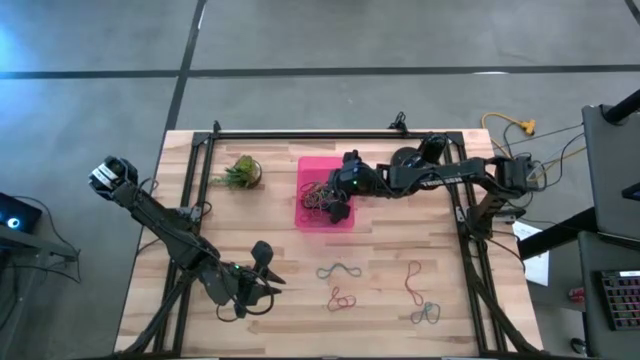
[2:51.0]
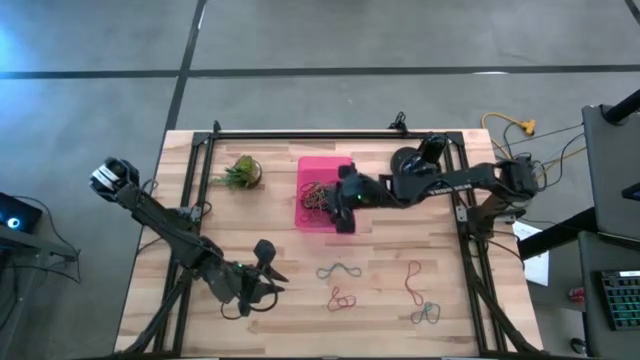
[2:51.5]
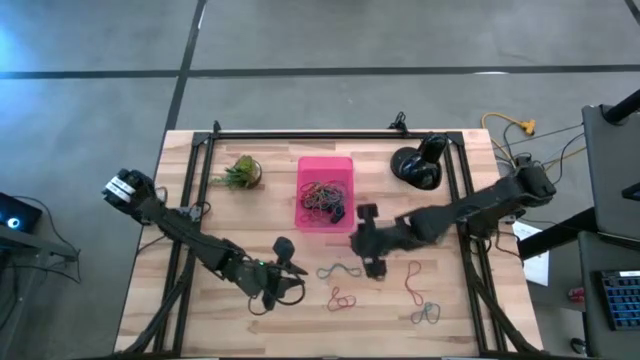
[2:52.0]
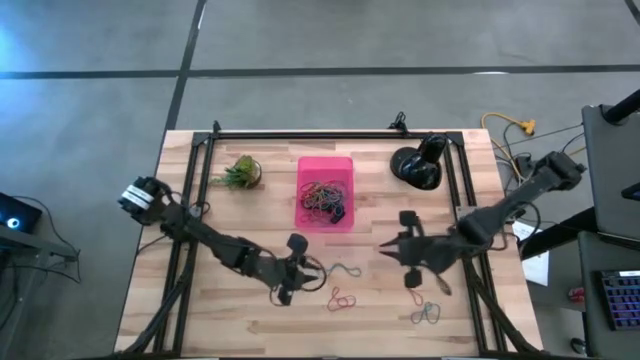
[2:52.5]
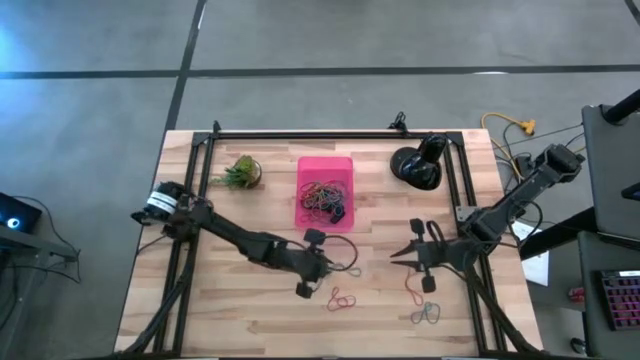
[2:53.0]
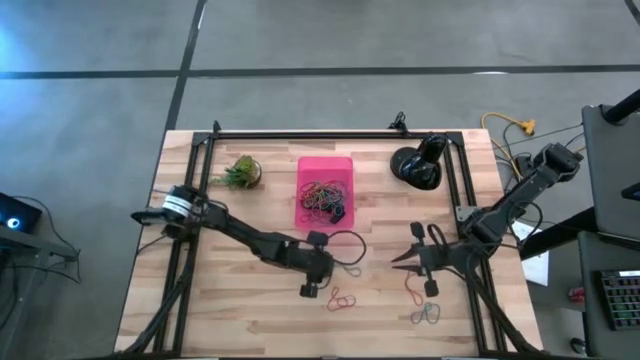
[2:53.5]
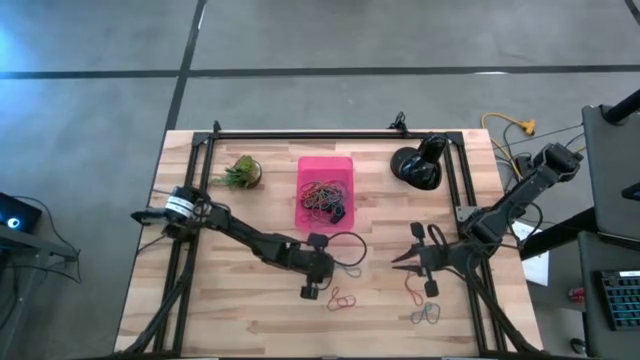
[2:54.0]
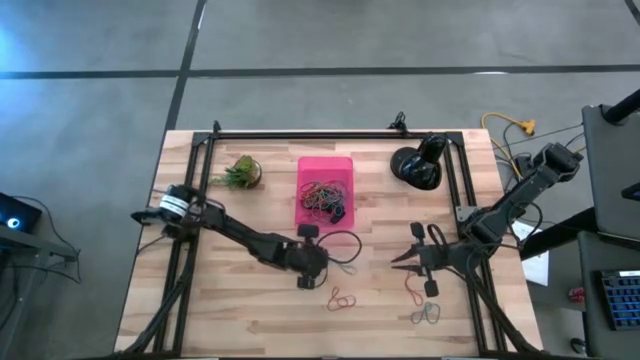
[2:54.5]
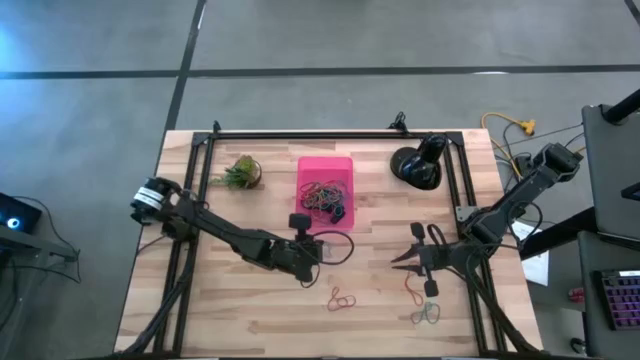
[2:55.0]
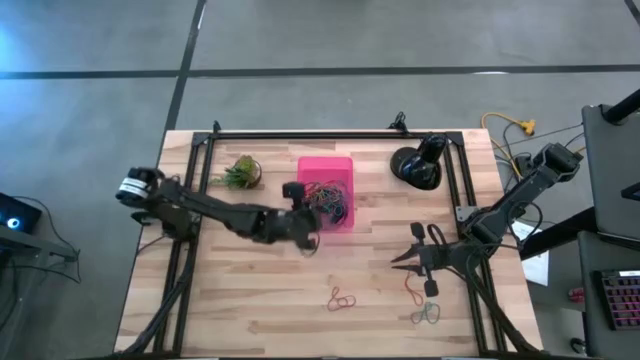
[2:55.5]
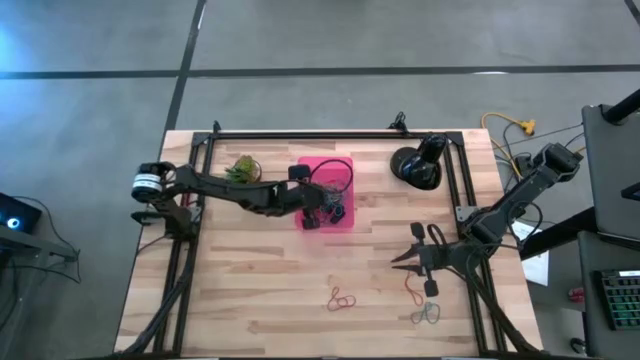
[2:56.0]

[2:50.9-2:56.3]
Task: Pick and place rubber bands into bin
Put the blue rubber bands into the pink bin

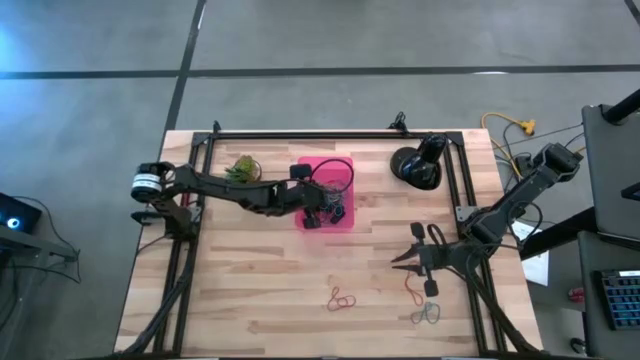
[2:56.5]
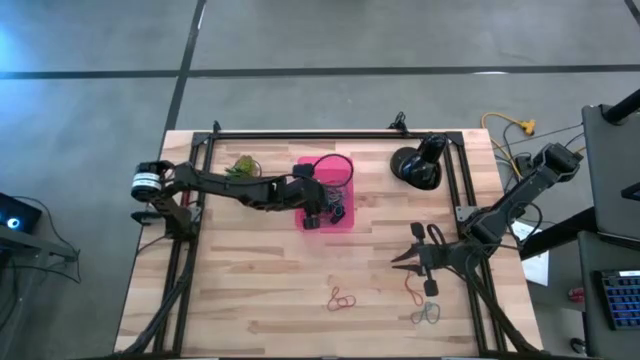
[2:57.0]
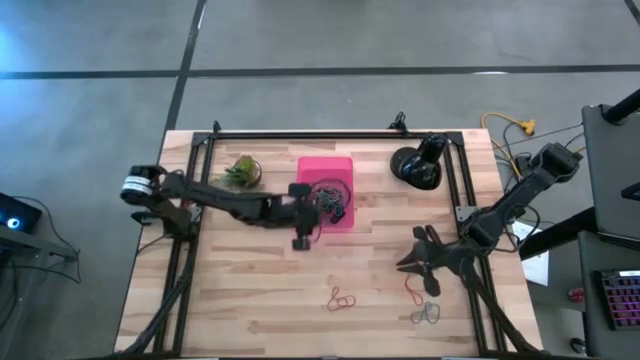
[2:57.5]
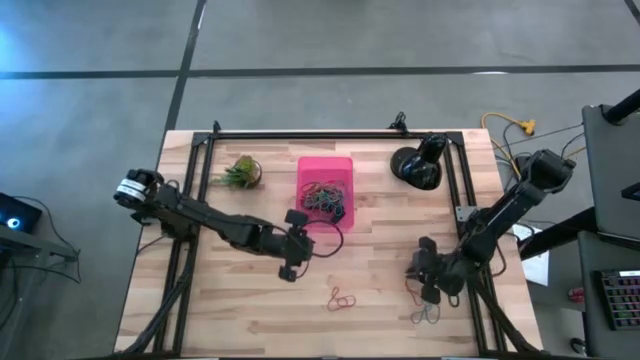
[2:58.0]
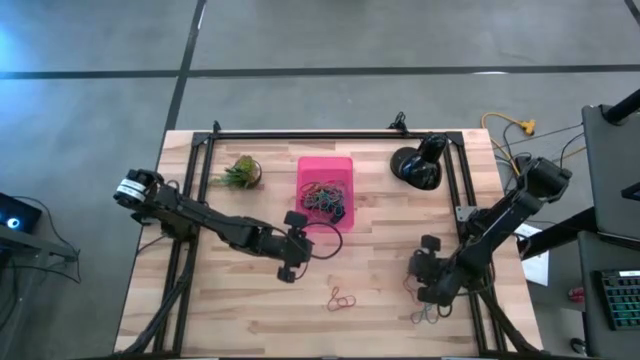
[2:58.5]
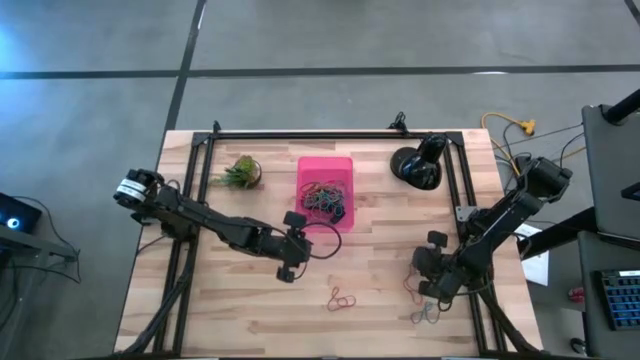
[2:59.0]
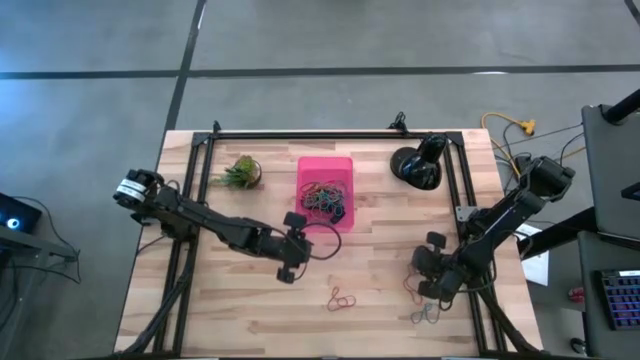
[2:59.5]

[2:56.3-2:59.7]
Put the red rubber bands into the pink bin

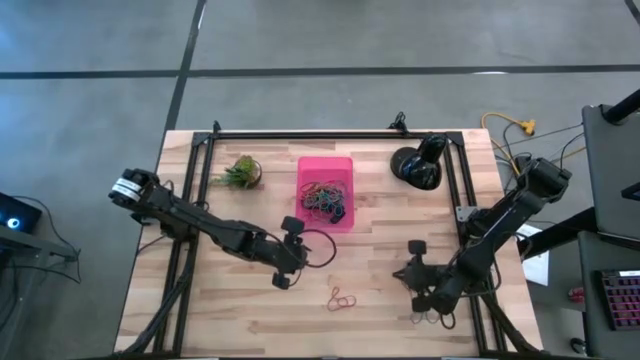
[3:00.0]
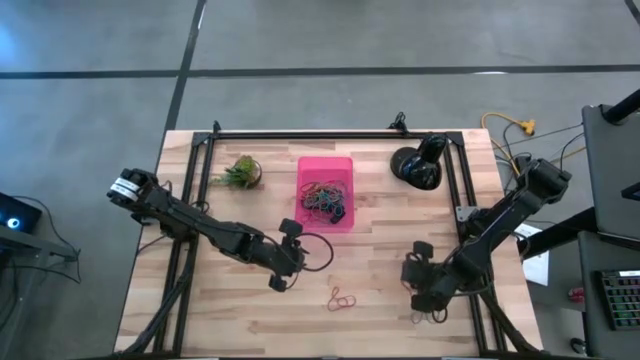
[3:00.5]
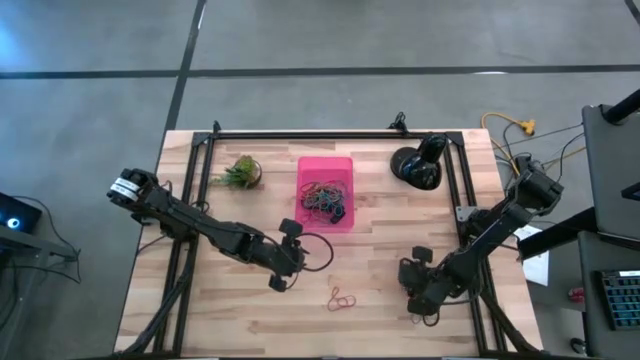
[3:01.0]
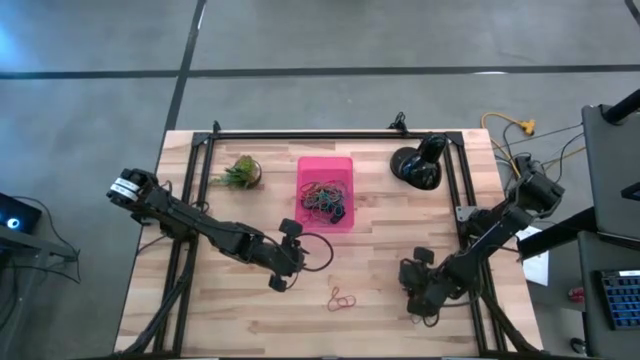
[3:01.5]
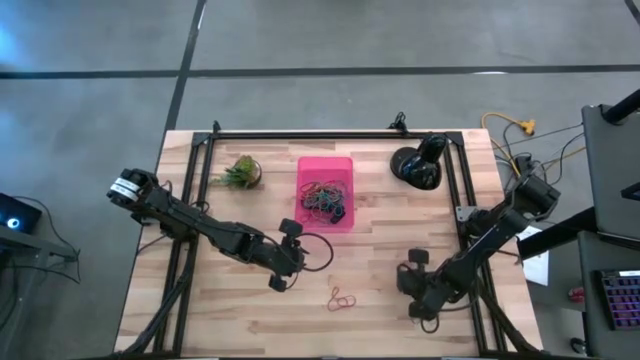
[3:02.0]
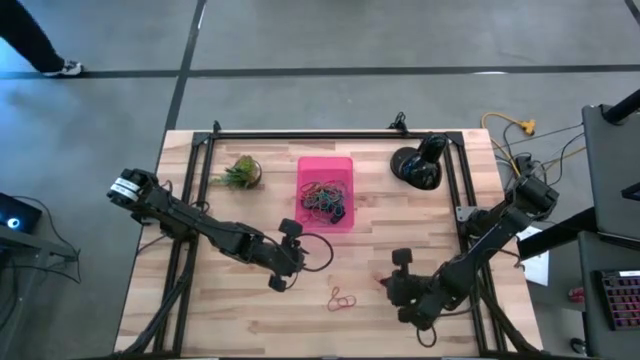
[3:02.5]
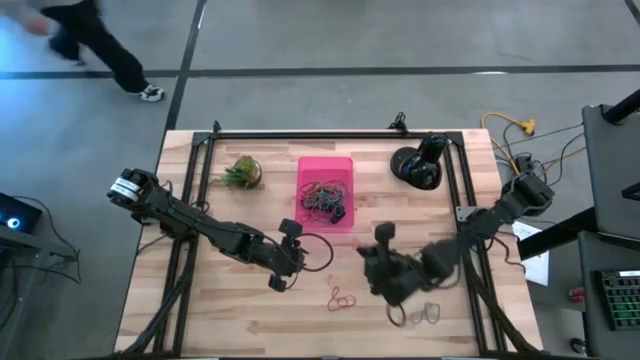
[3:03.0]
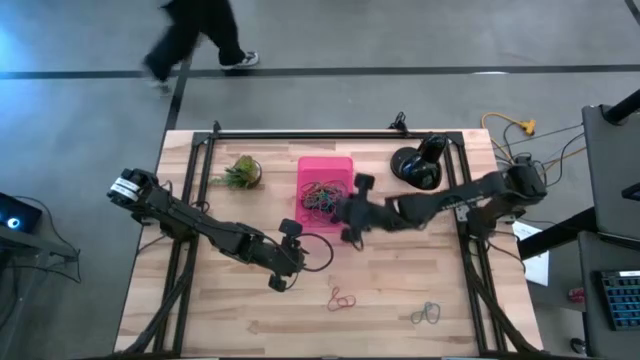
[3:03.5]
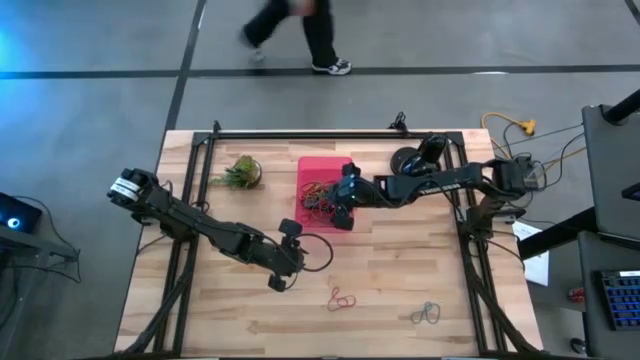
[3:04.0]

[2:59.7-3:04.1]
Put the red rubber bands into the pink bin

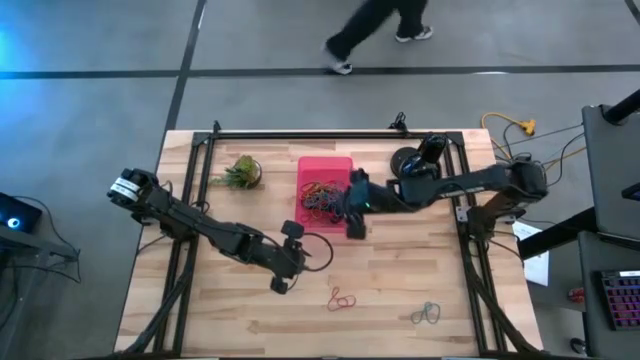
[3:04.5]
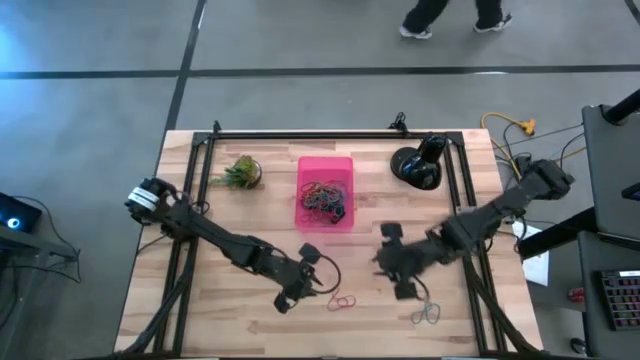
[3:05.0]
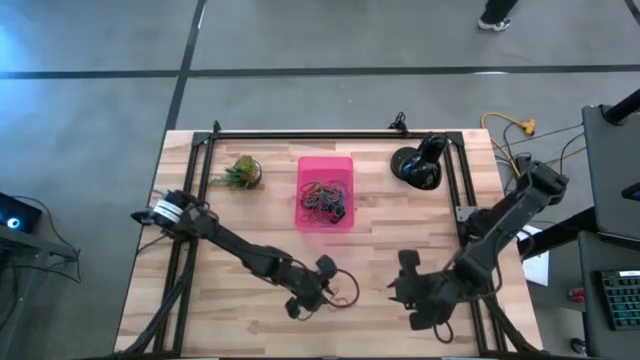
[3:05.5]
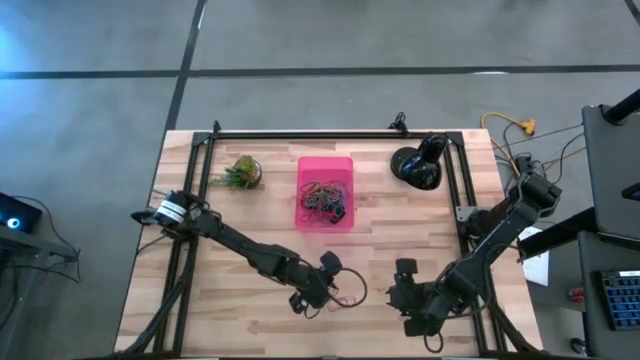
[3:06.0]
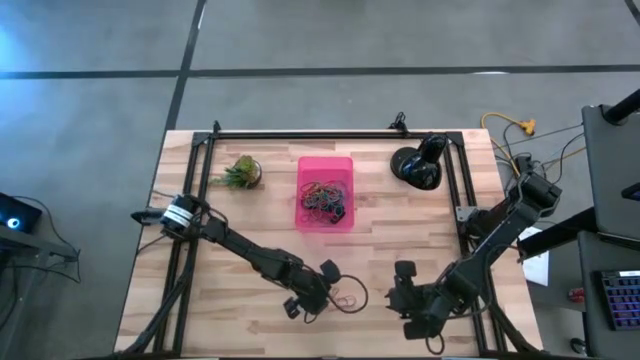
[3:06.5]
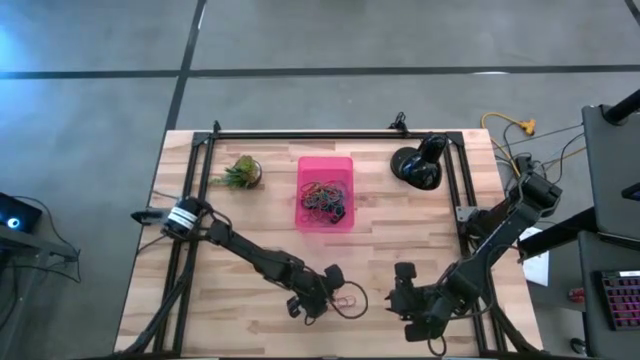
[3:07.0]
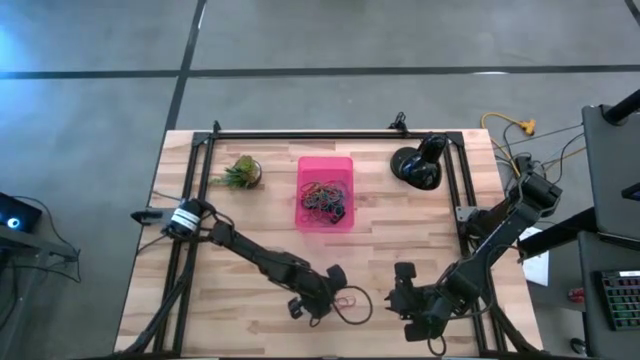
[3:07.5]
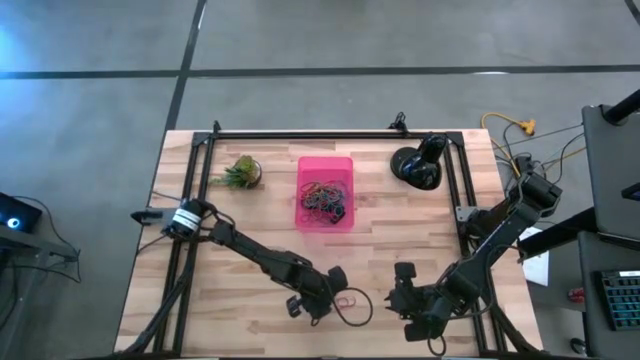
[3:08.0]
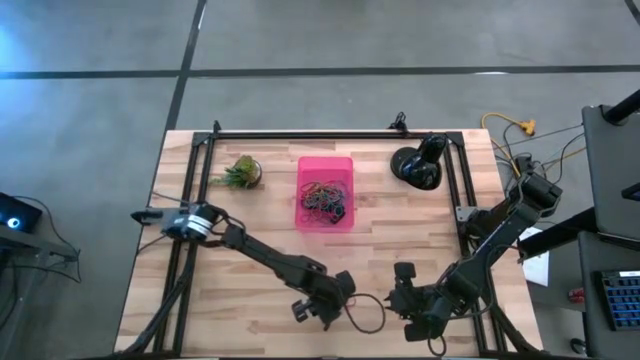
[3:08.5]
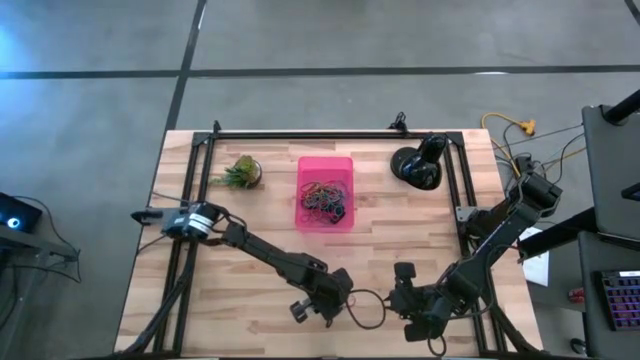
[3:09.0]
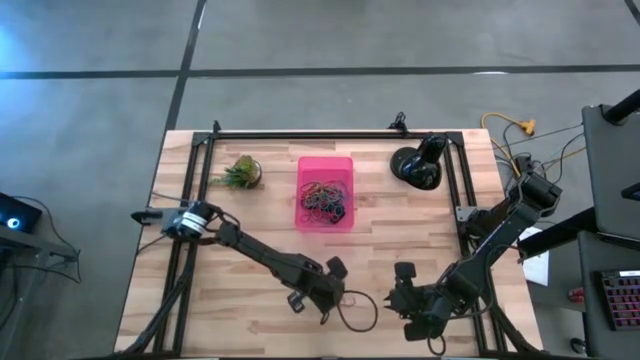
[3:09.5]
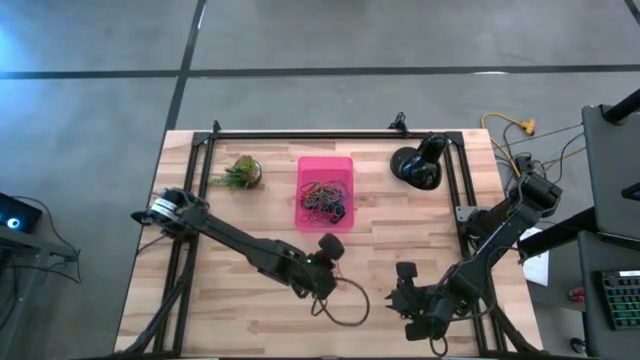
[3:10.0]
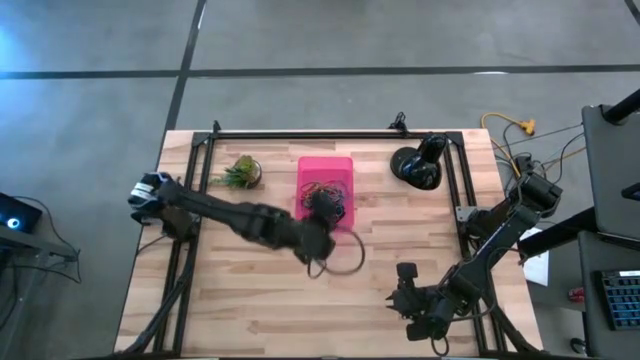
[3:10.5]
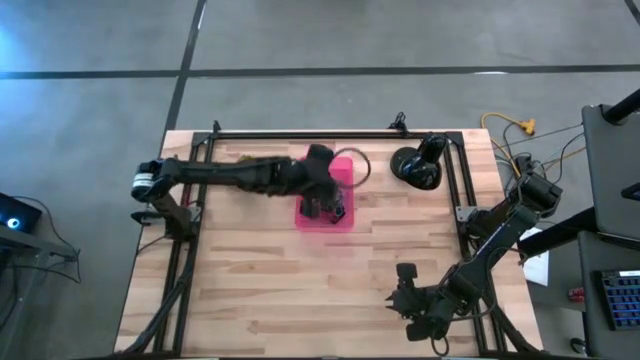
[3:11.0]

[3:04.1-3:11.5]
Put the red rubber bands into the pink bin
